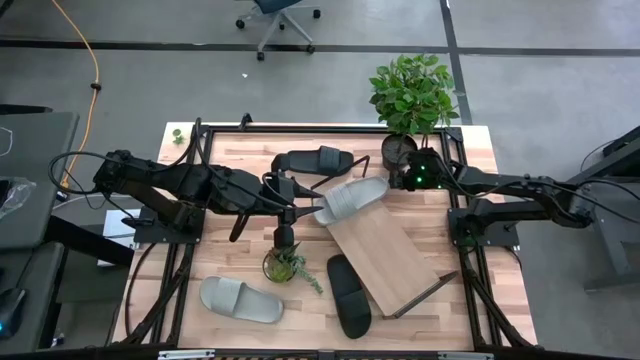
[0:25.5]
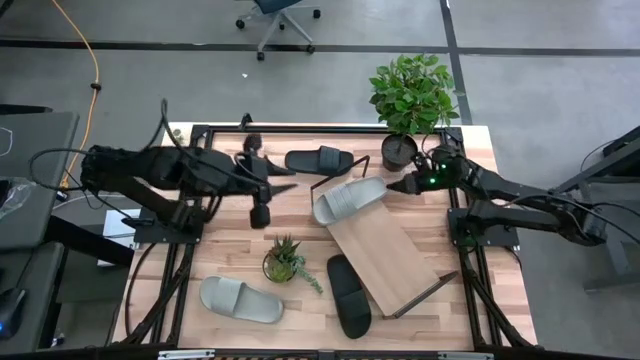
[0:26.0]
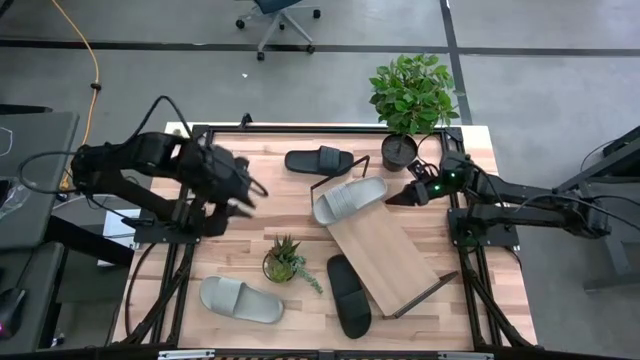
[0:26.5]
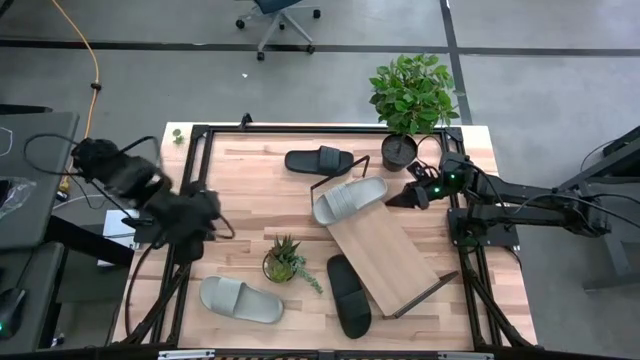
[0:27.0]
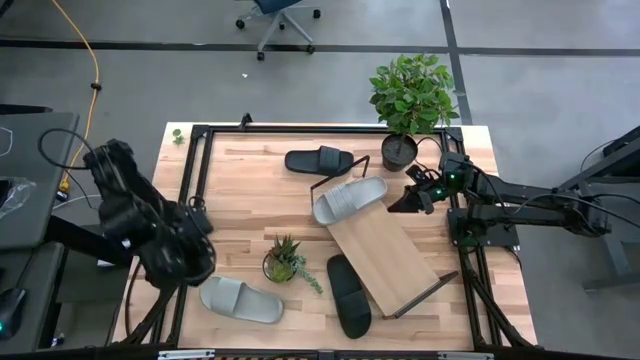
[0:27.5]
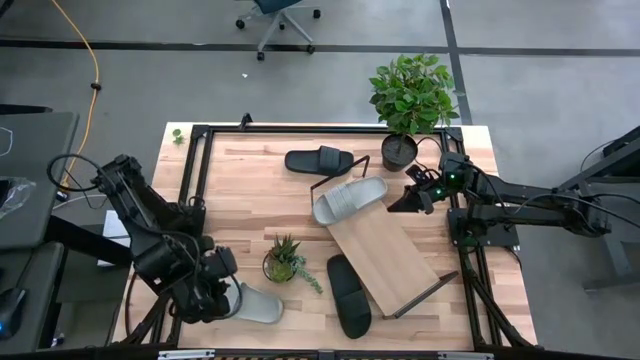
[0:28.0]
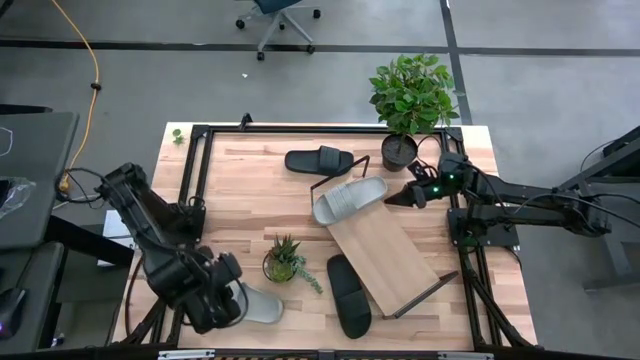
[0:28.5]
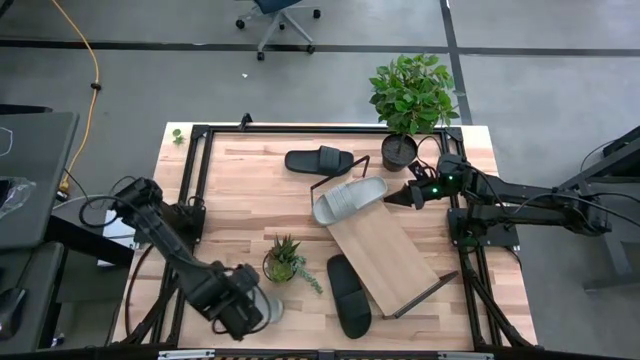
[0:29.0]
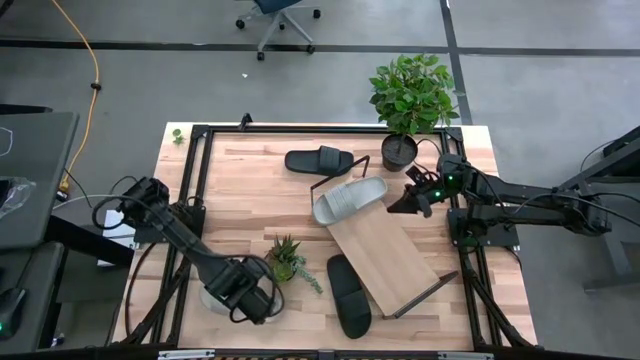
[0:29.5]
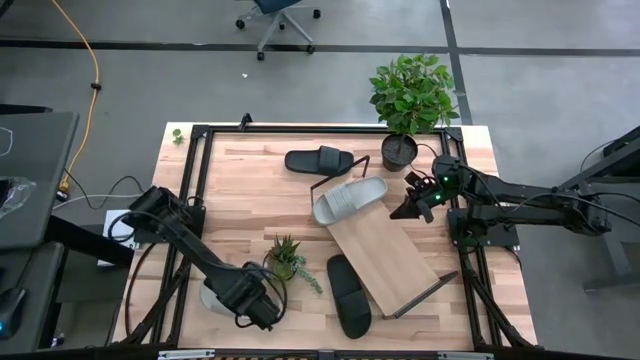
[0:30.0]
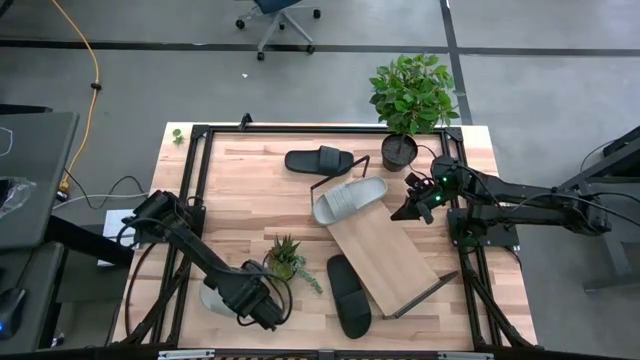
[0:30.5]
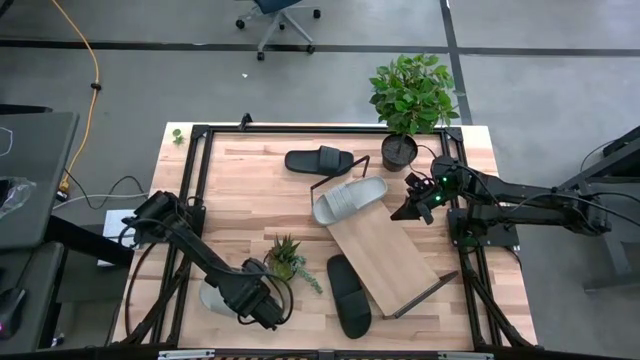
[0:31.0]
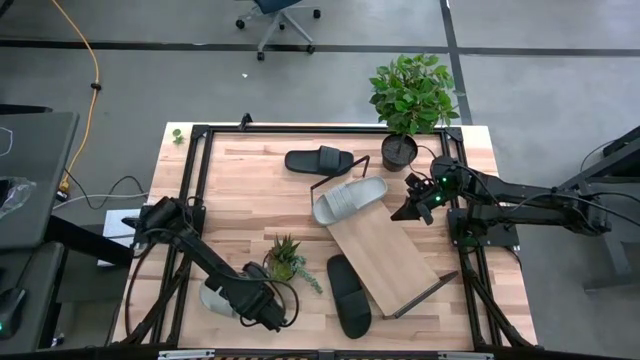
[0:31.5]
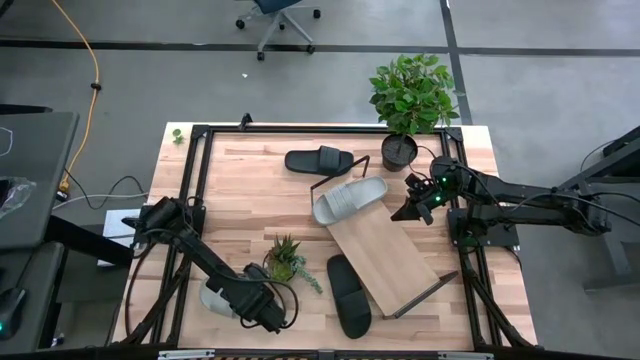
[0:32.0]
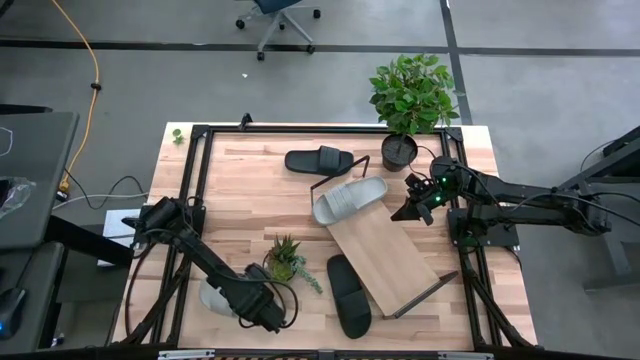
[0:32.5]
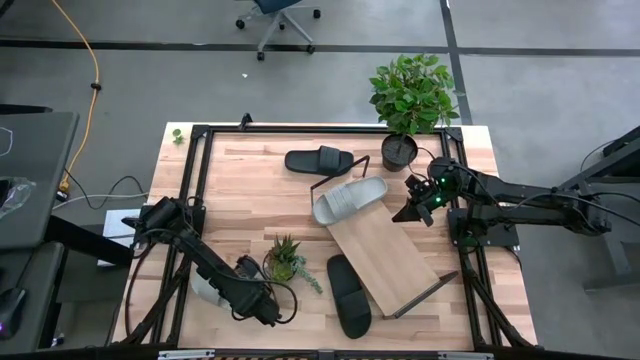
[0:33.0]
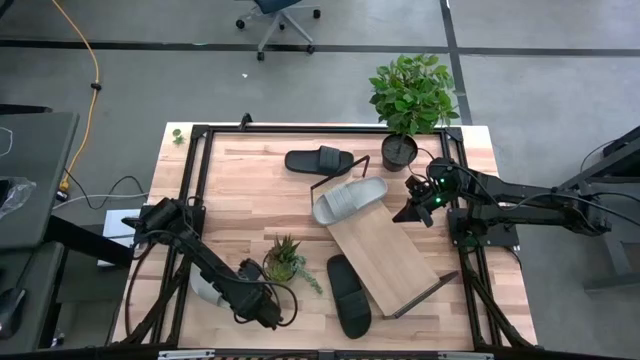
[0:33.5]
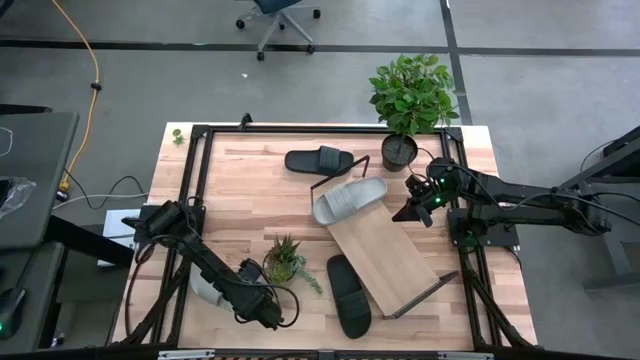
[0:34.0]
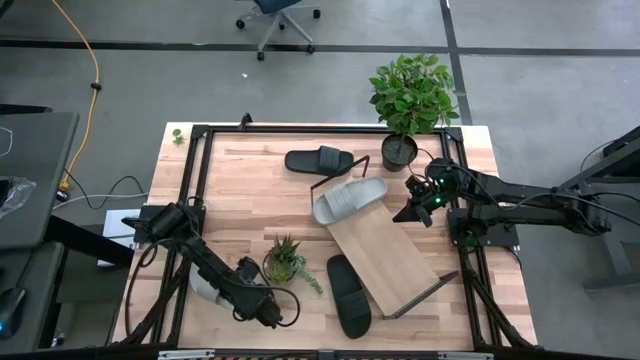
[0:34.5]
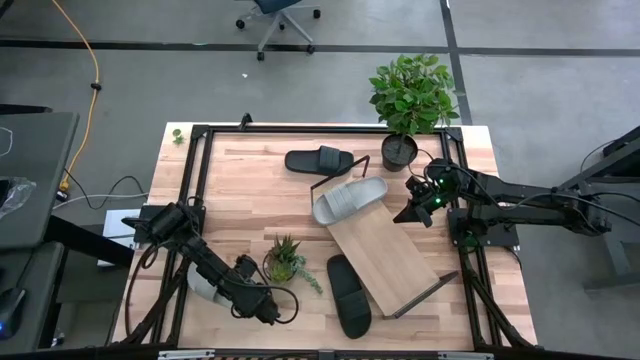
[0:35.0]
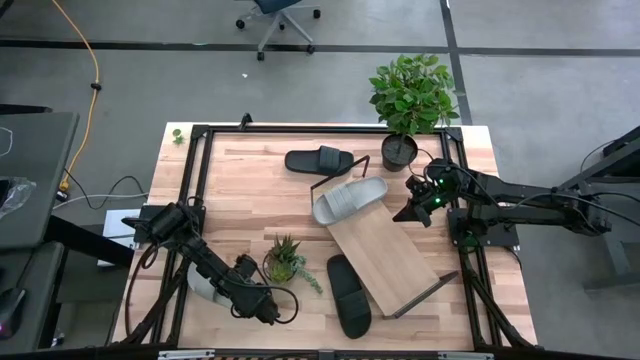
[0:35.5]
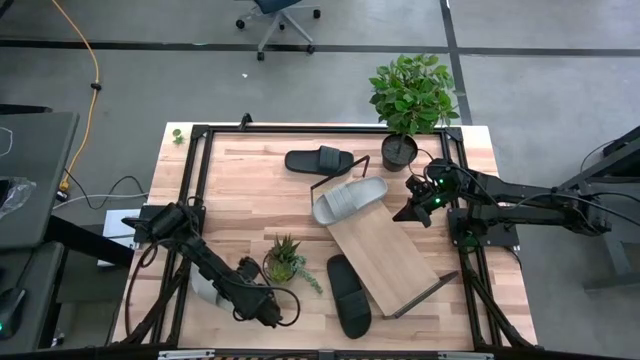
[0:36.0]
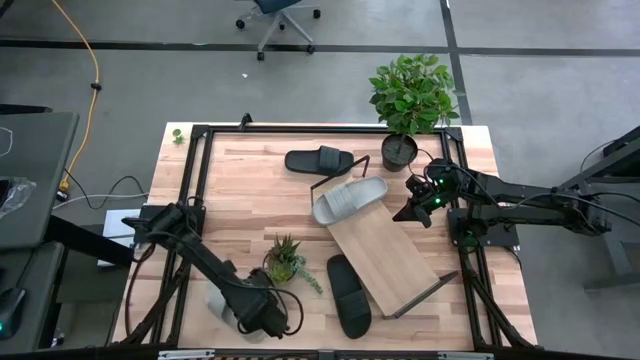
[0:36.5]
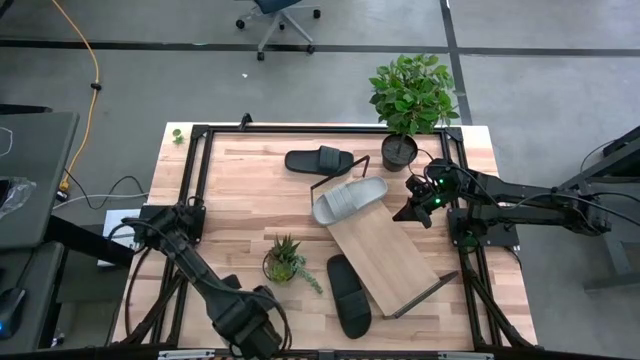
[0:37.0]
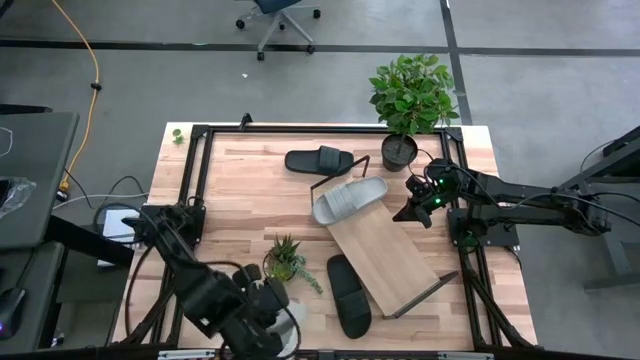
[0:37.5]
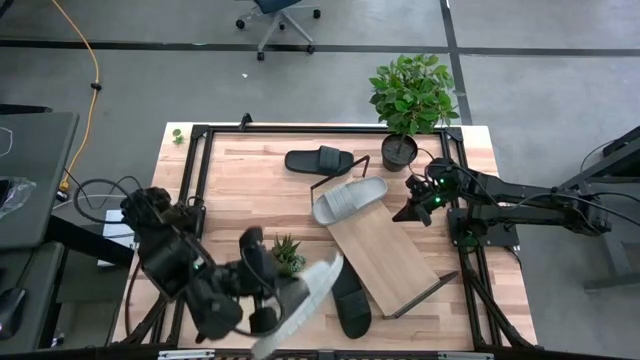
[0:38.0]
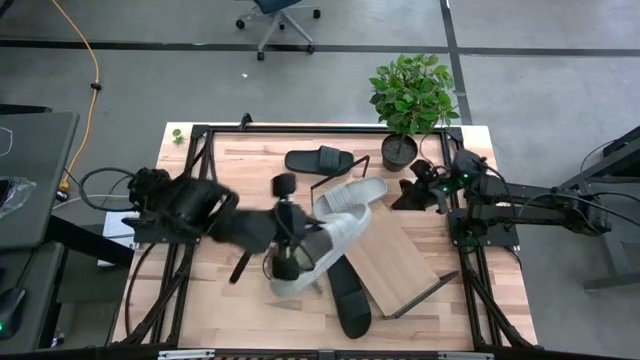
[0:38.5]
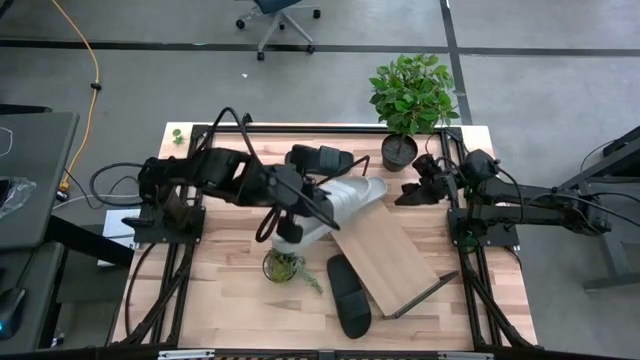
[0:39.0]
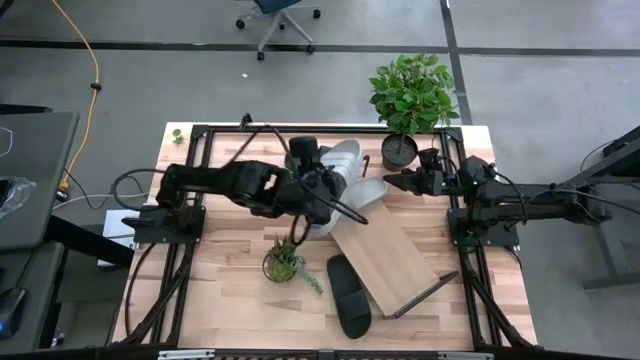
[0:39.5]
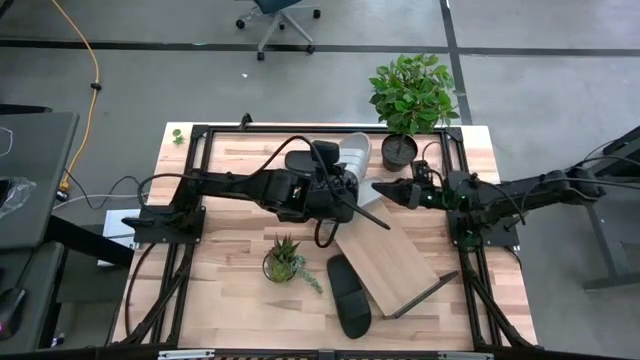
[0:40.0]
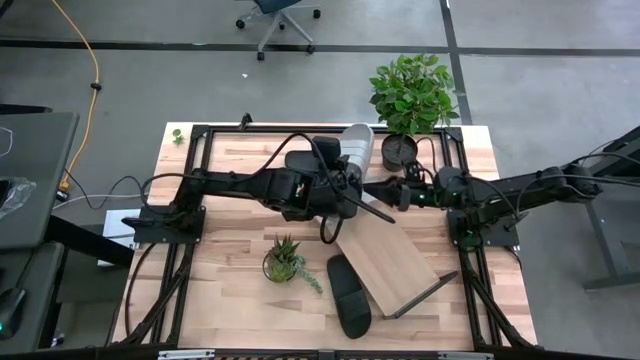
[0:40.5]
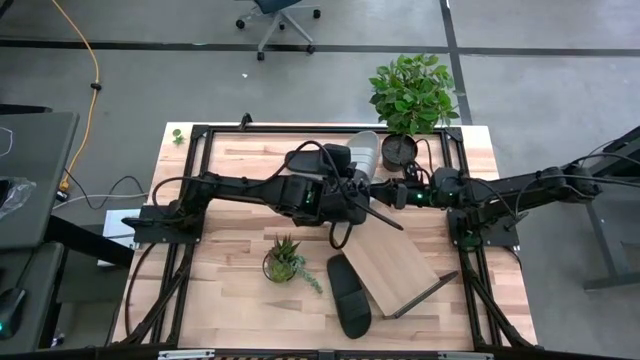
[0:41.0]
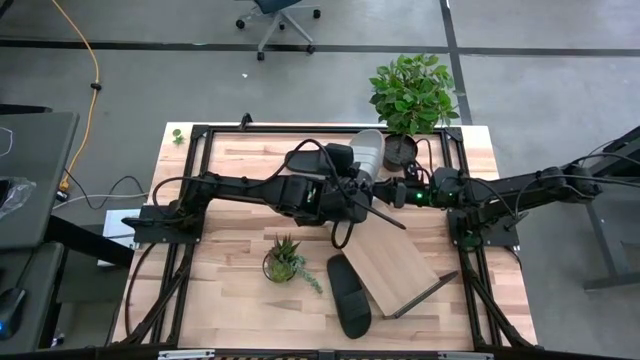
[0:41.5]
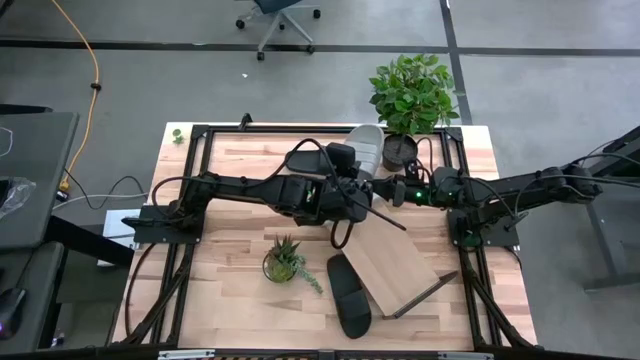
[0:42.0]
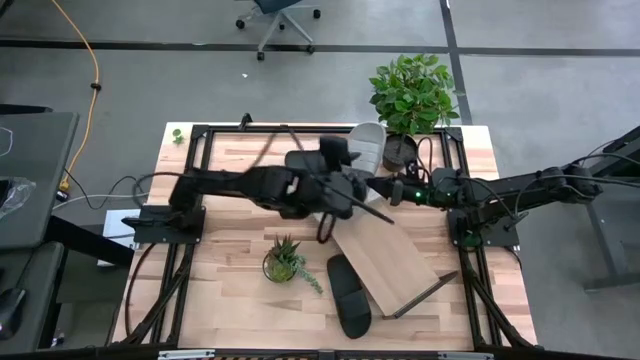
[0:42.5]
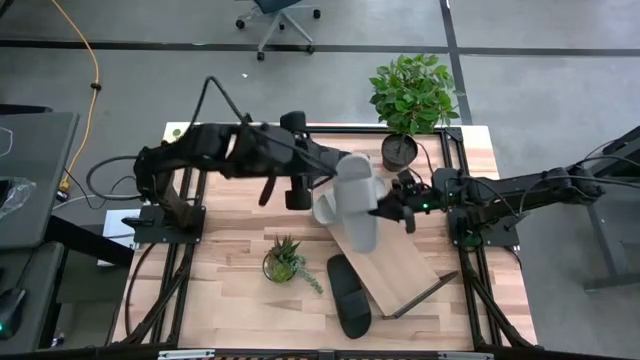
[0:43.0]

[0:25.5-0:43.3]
Task: Pick and place slides into the shelf
Put the gray slide on the shelf
